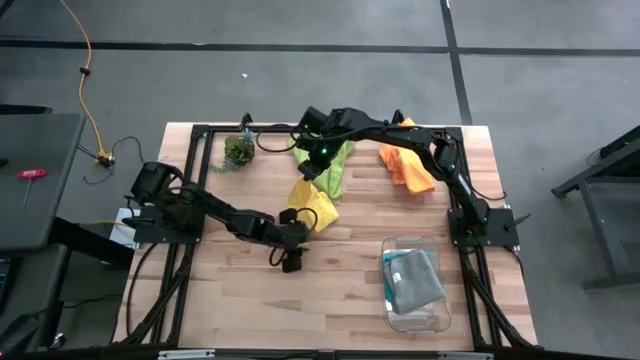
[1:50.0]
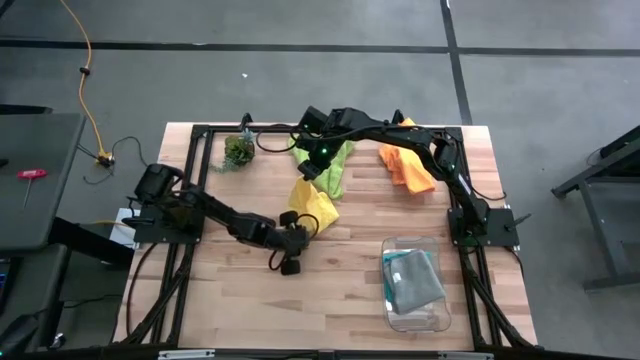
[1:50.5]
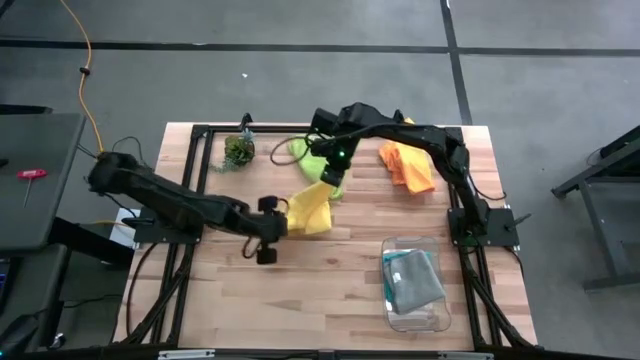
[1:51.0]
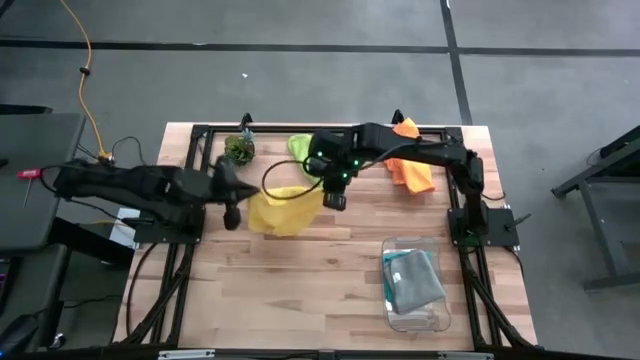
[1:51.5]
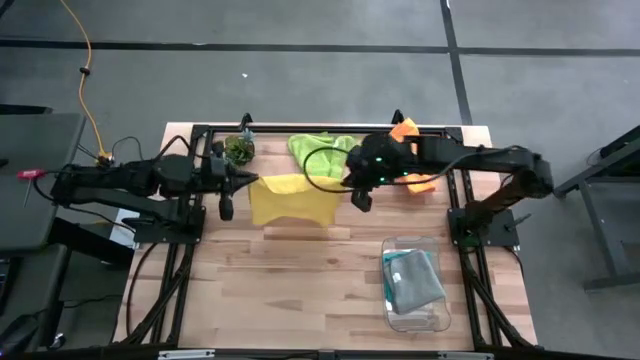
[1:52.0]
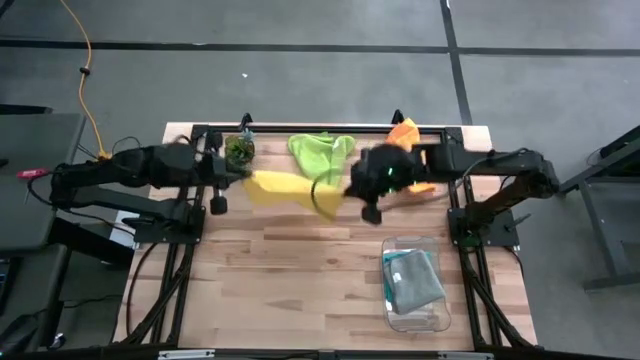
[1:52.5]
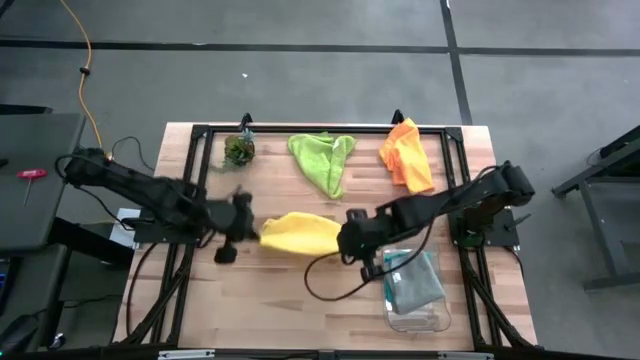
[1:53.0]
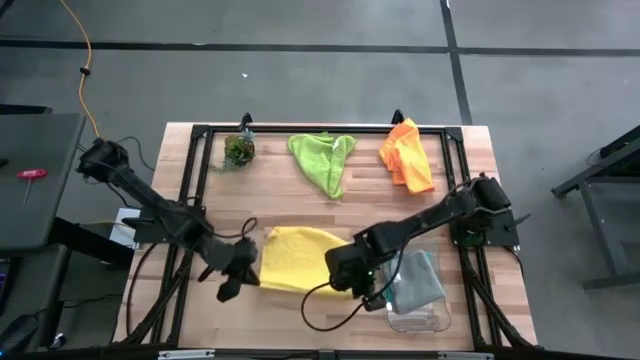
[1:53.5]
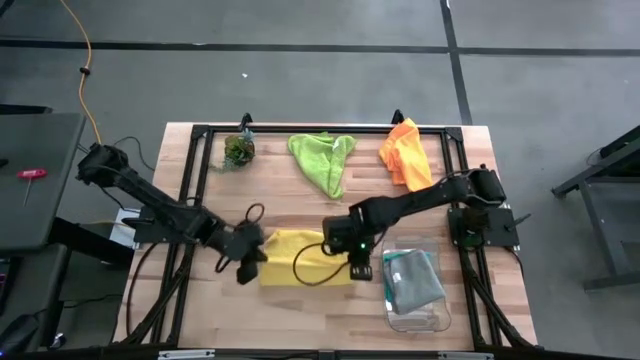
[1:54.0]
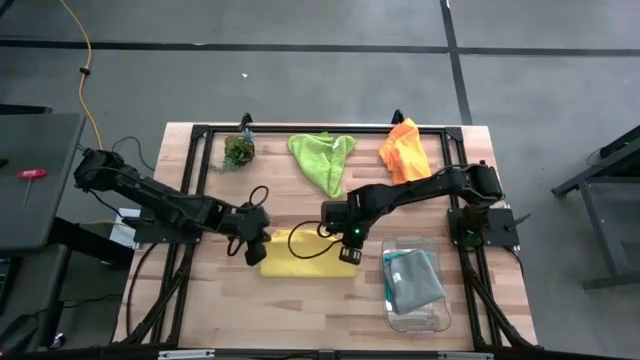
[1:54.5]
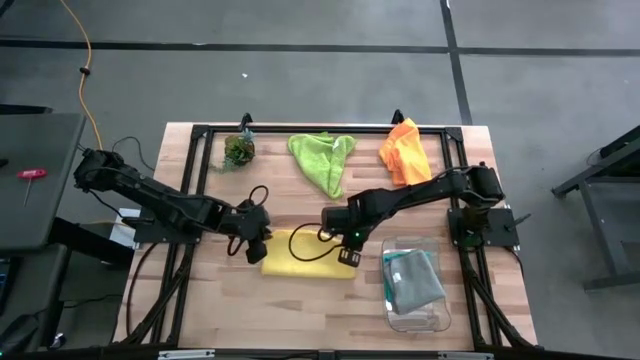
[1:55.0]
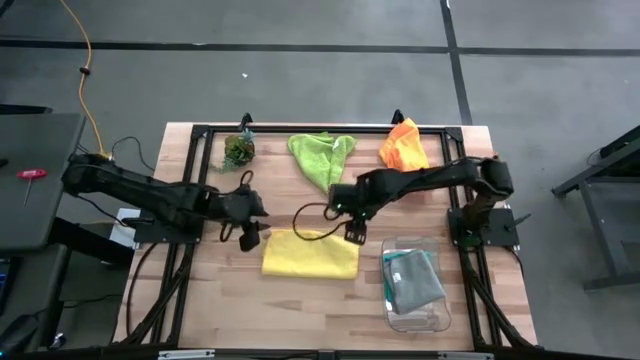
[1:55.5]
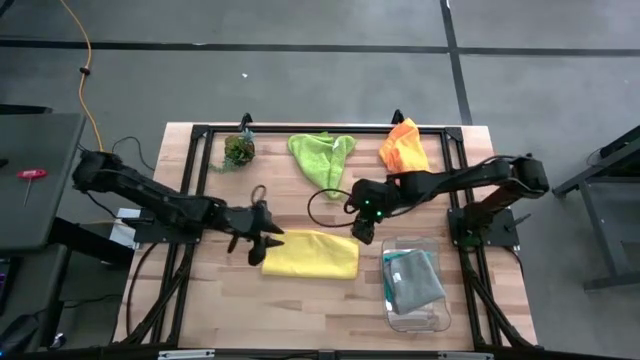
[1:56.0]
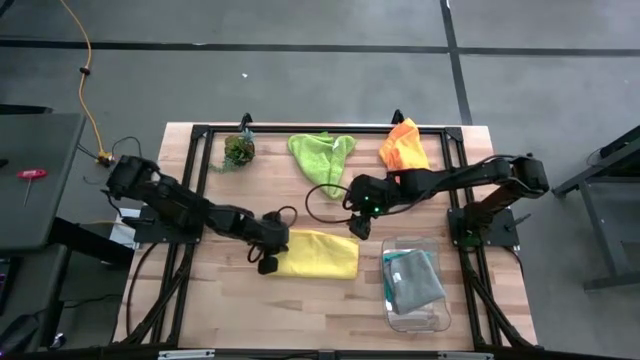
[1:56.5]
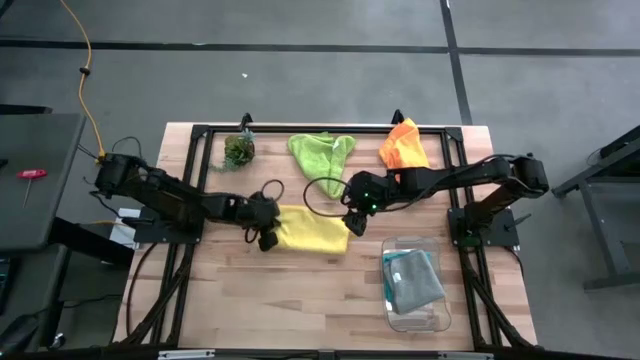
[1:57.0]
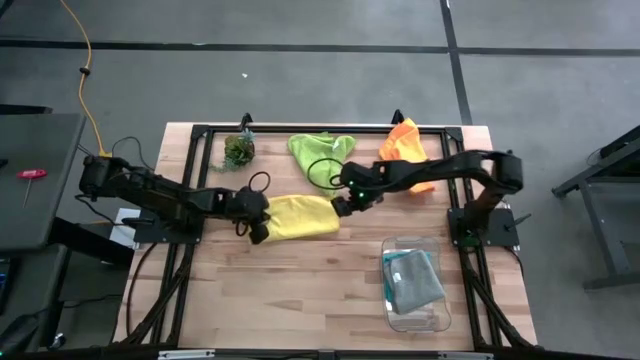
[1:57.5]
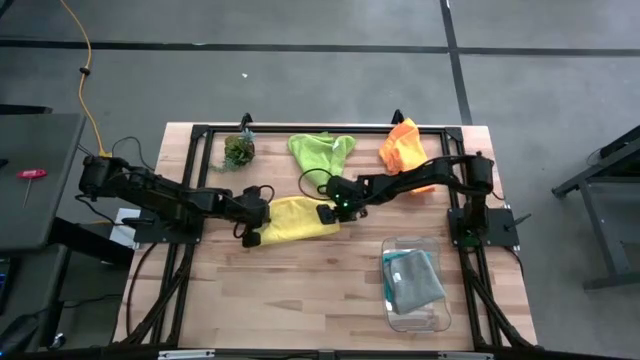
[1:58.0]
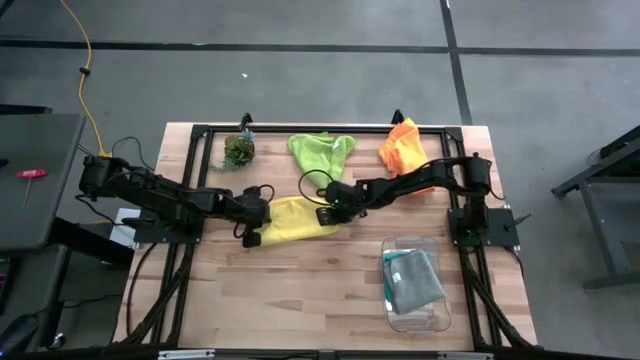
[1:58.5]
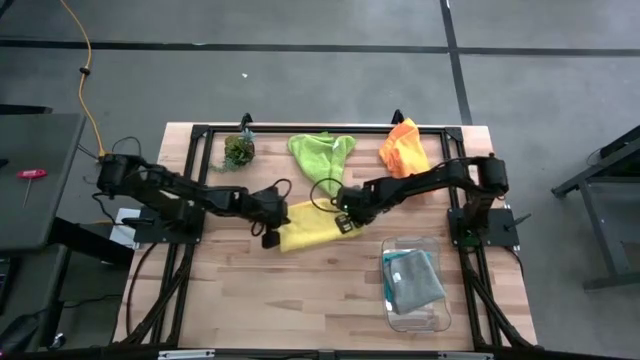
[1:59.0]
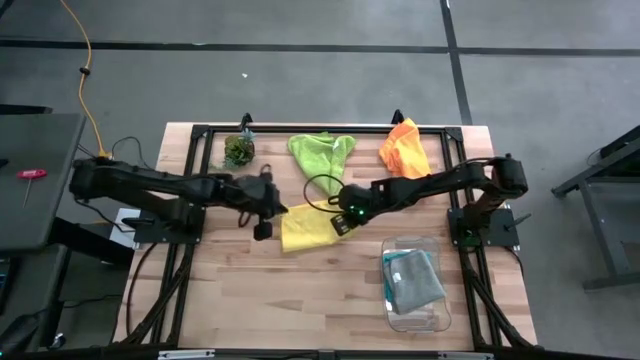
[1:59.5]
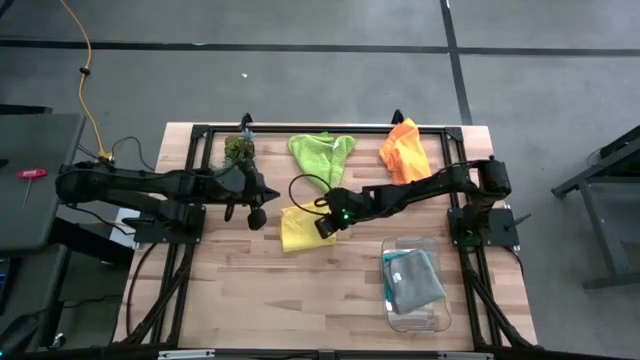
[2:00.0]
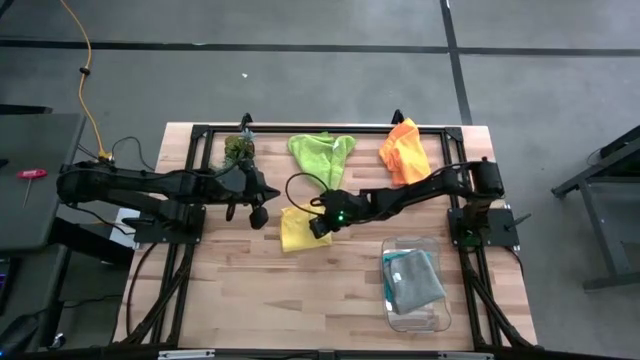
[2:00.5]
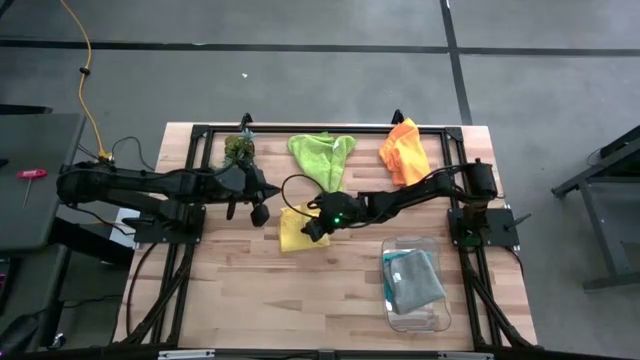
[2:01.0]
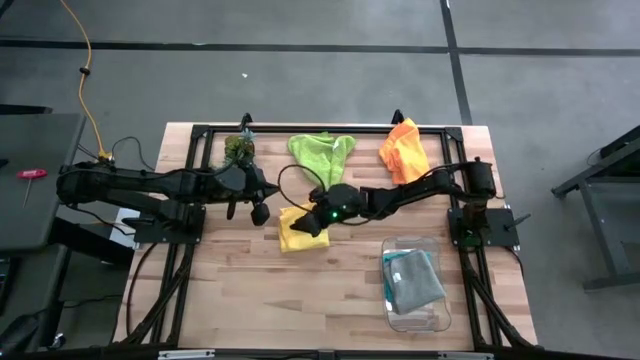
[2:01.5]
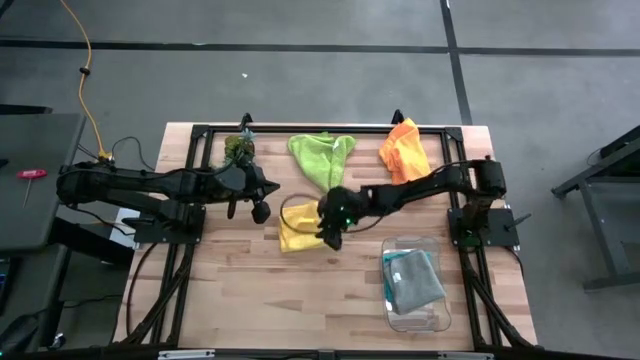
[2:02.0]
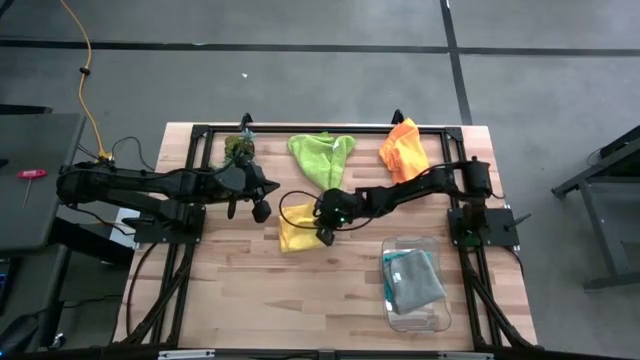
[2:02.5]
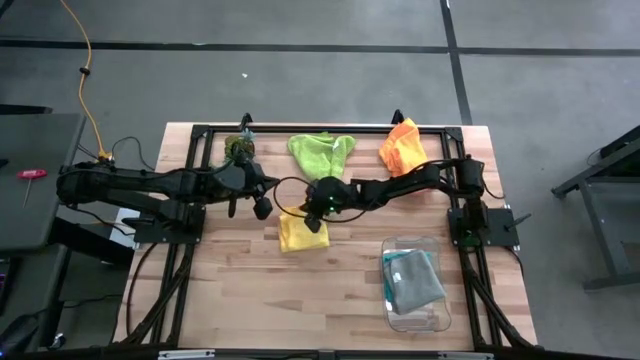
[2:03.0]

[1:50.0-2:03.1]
Task: Fold microfiber towels
Fold the yellow microfiber cloth

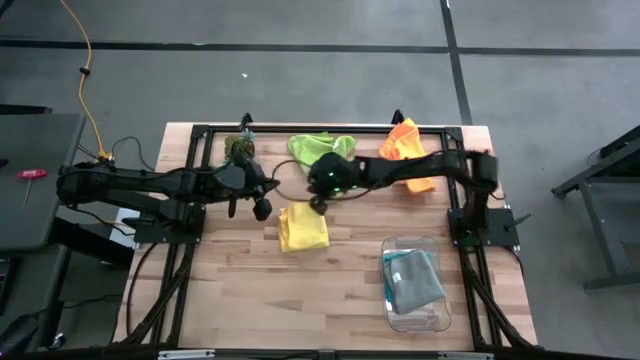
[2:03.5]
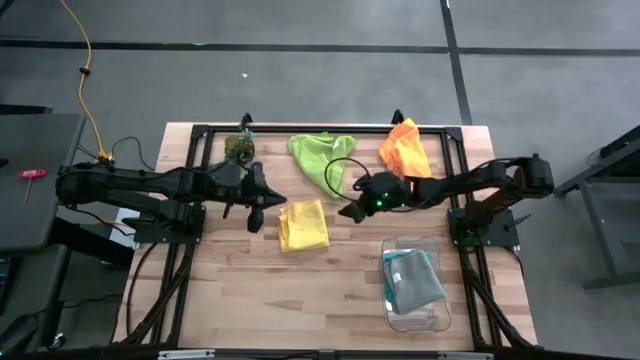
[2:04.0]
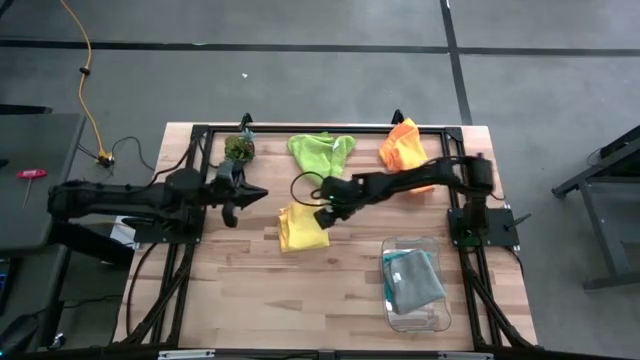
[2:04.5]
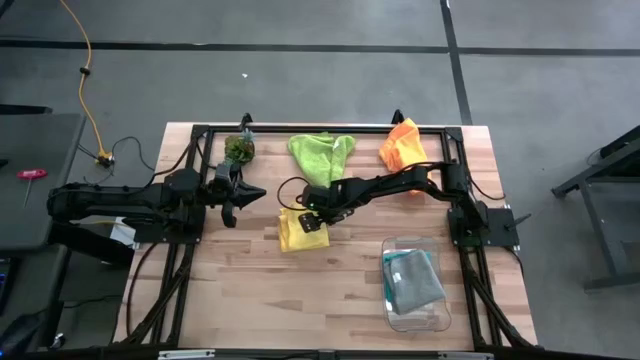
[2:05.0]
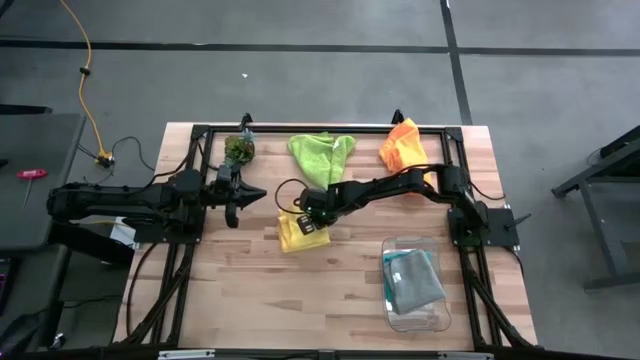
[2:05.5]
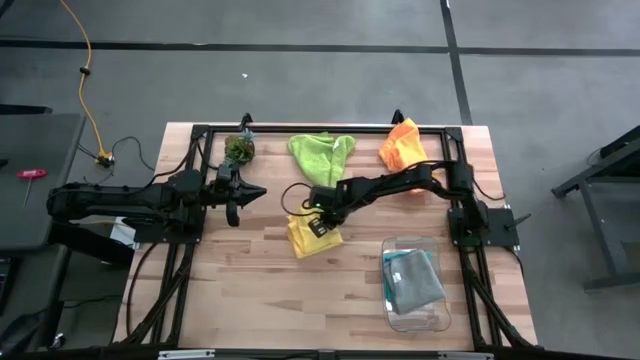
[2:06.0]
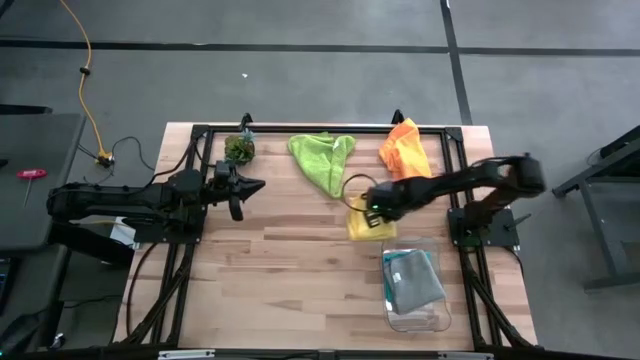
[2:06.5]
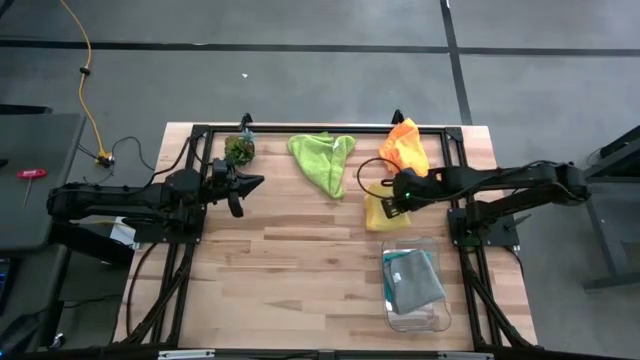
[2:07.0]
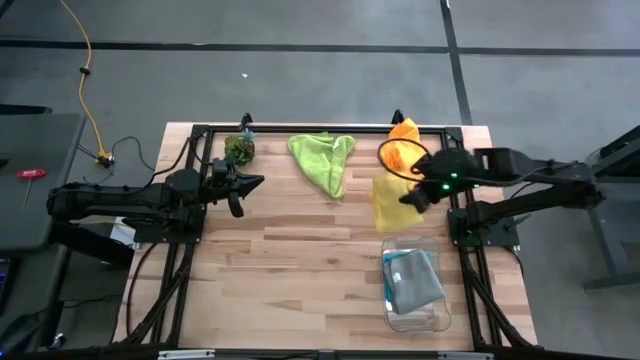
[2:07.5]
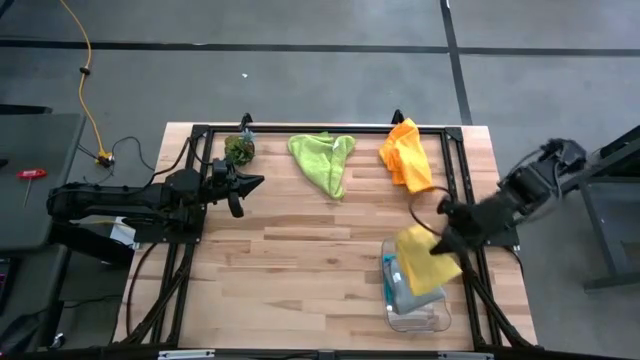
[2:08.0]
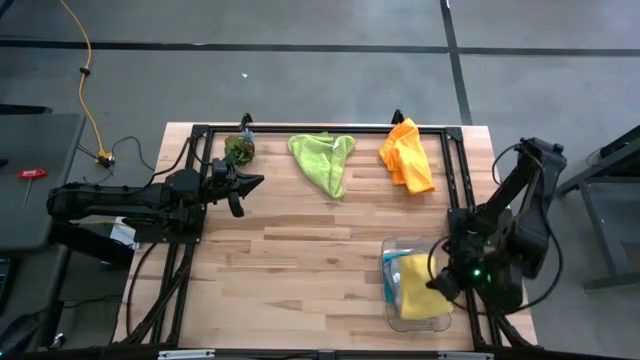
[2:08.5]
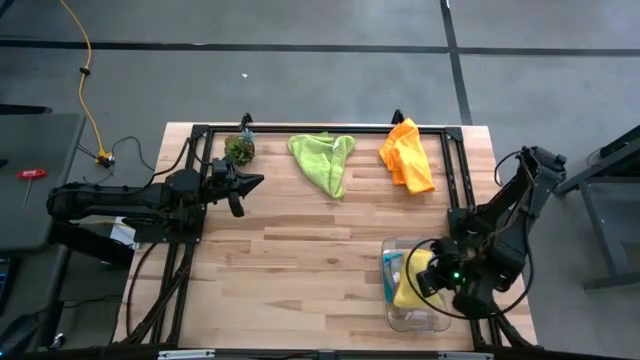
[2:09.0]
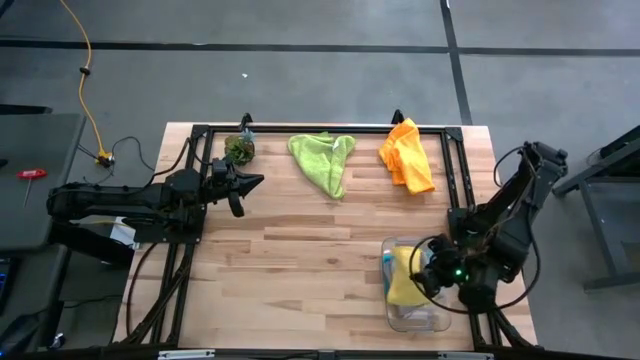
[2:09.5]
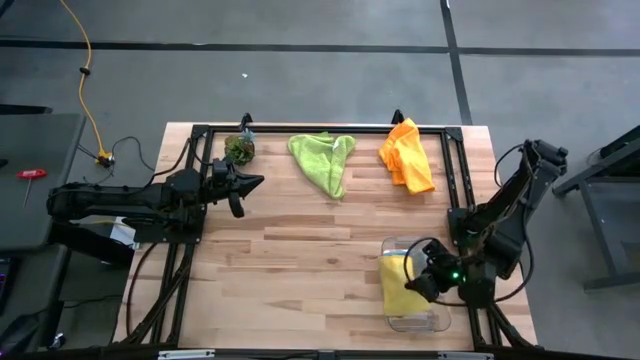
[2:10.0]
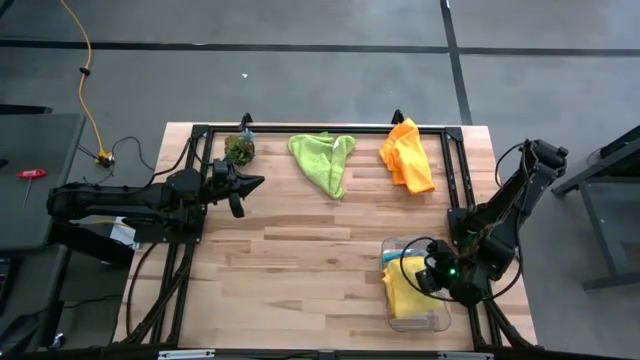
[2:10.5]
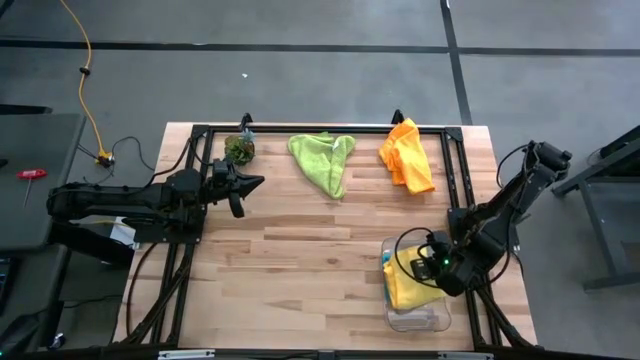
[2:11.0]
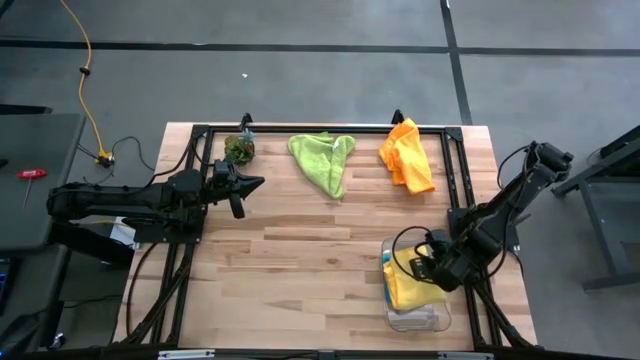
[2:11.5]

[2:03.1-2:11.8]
Stack the folded yellow microfiber cloth on top of the gray microfiber cloth in the transparent bin
